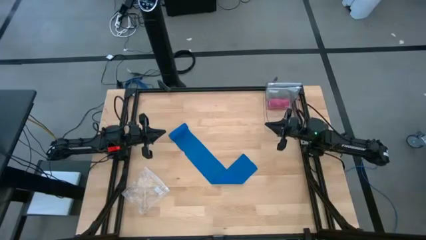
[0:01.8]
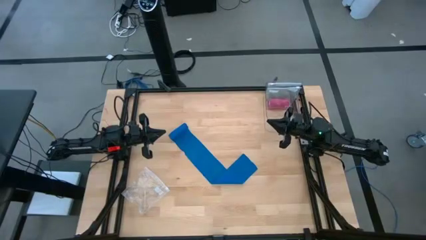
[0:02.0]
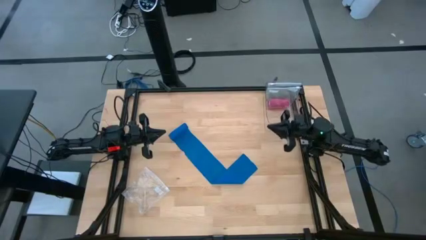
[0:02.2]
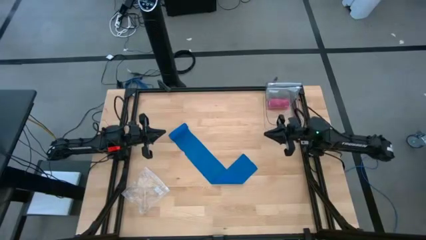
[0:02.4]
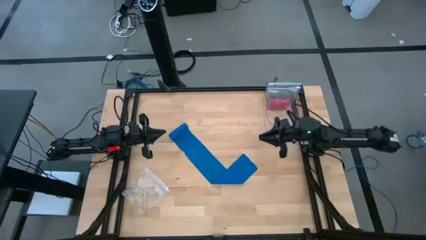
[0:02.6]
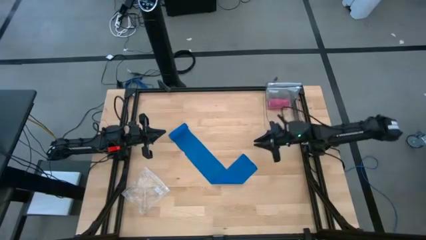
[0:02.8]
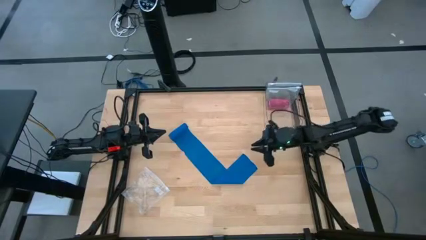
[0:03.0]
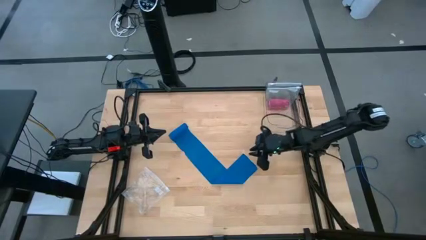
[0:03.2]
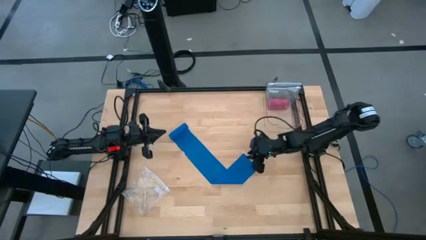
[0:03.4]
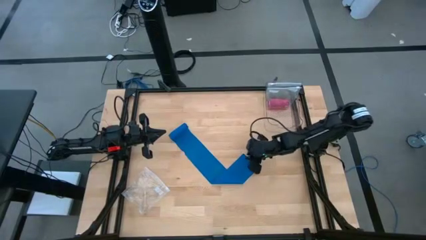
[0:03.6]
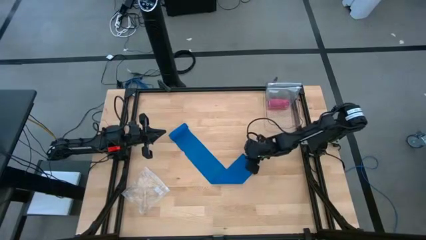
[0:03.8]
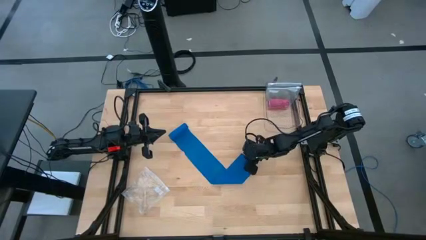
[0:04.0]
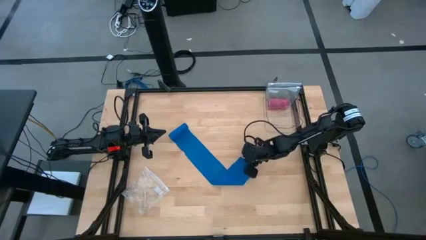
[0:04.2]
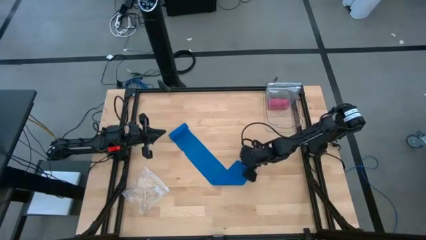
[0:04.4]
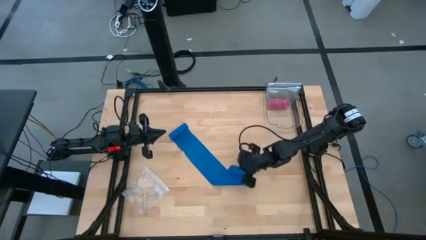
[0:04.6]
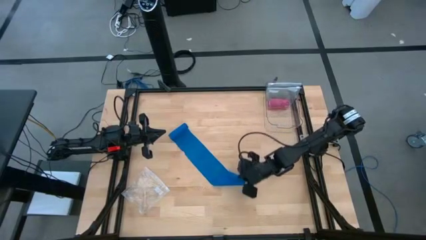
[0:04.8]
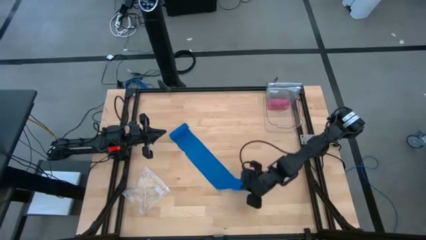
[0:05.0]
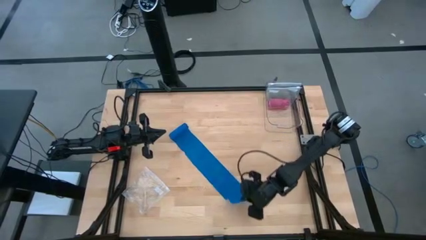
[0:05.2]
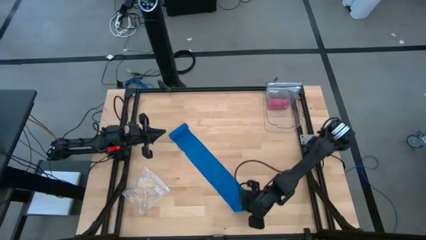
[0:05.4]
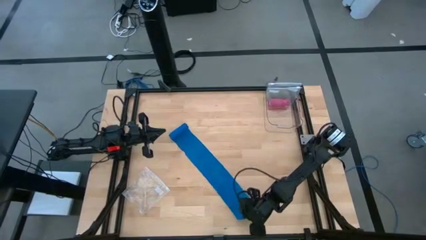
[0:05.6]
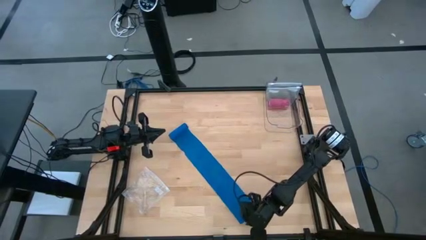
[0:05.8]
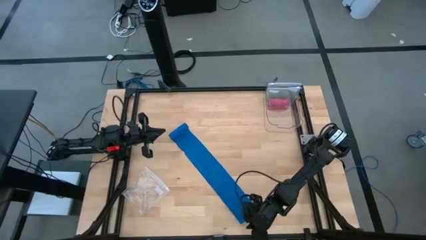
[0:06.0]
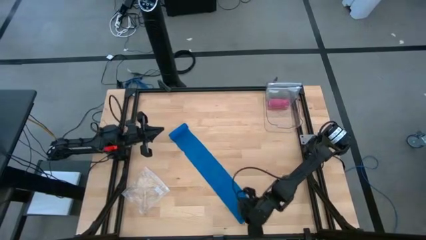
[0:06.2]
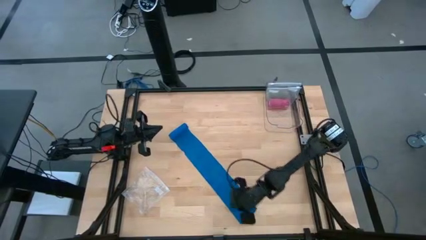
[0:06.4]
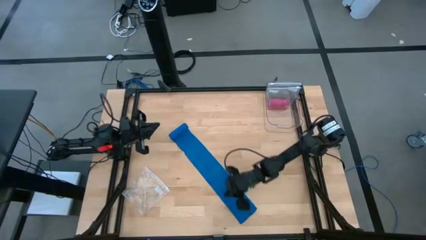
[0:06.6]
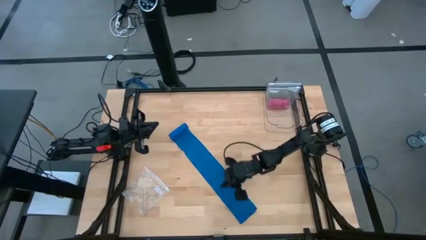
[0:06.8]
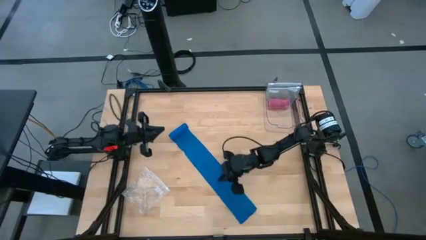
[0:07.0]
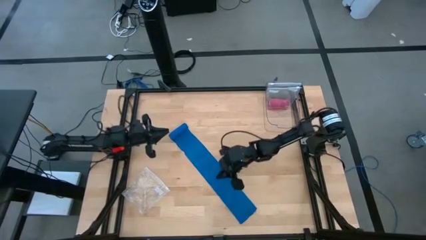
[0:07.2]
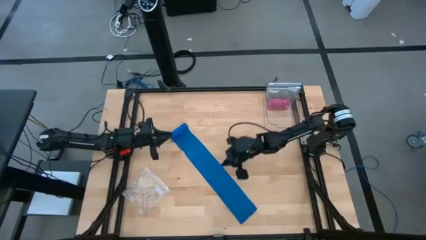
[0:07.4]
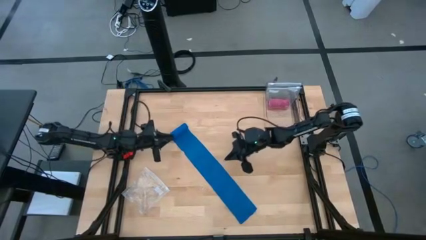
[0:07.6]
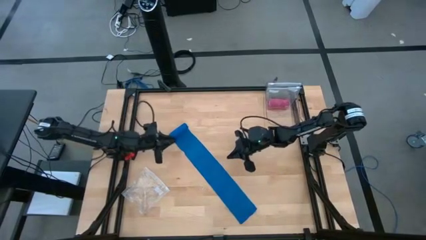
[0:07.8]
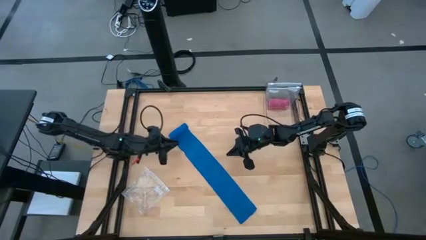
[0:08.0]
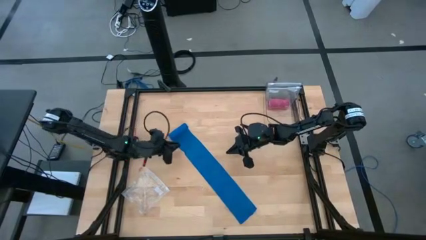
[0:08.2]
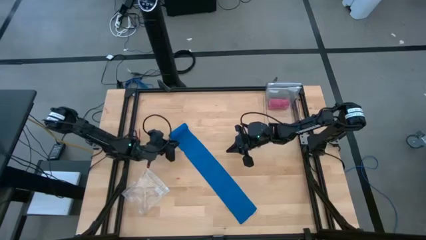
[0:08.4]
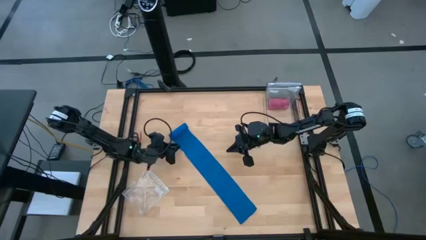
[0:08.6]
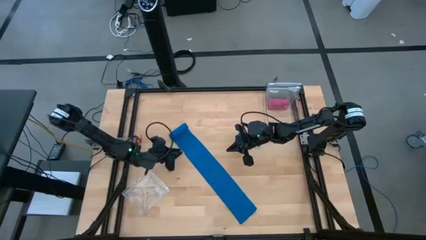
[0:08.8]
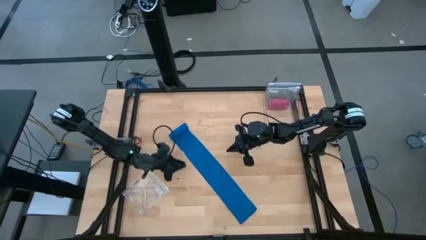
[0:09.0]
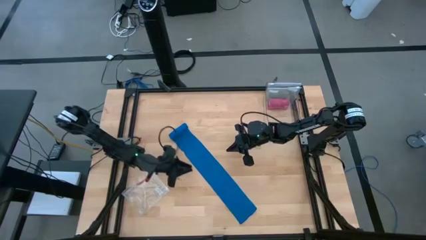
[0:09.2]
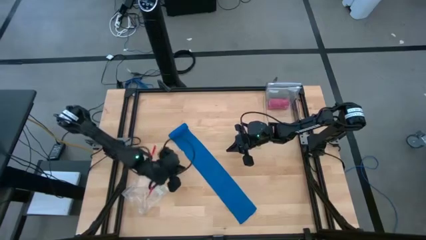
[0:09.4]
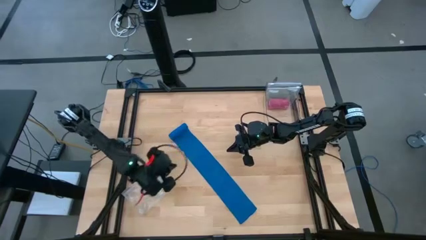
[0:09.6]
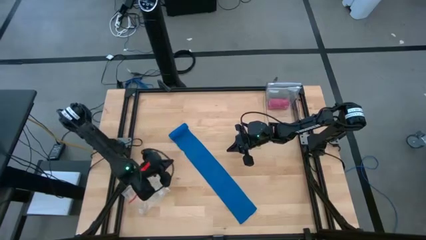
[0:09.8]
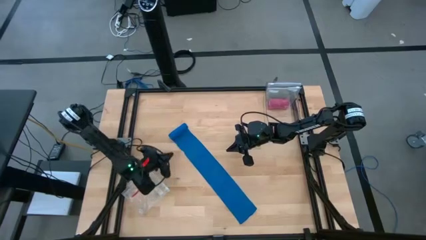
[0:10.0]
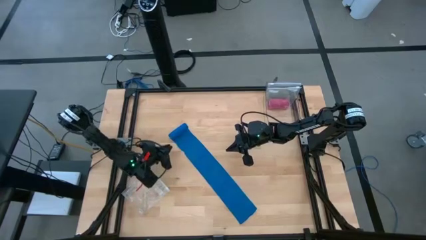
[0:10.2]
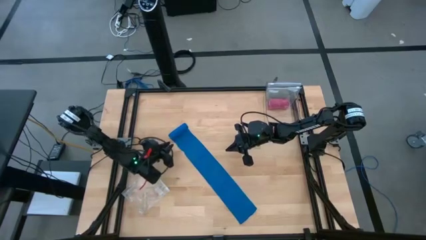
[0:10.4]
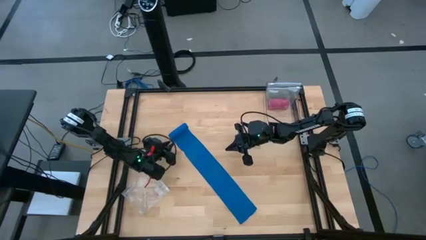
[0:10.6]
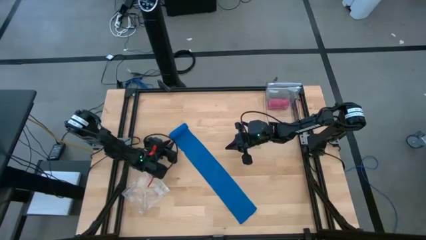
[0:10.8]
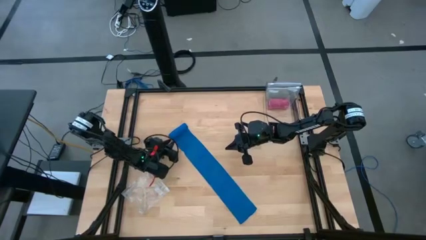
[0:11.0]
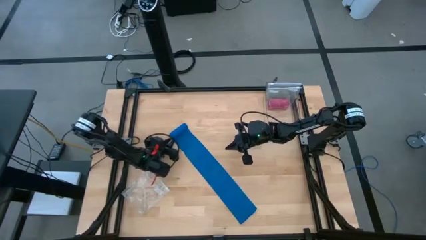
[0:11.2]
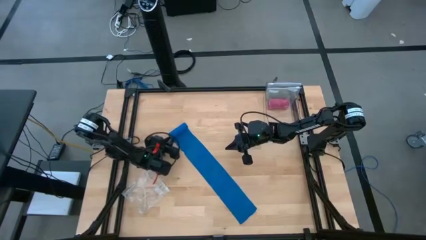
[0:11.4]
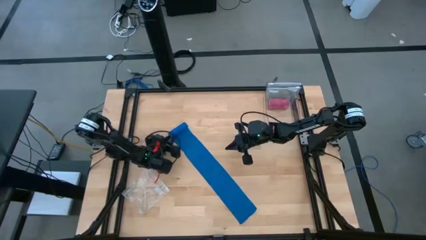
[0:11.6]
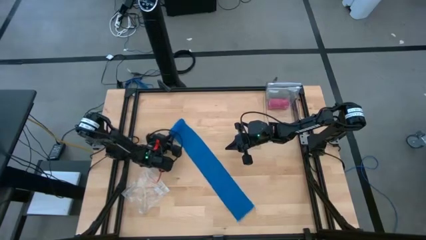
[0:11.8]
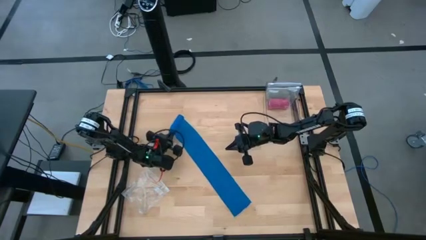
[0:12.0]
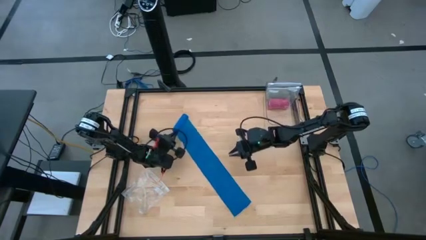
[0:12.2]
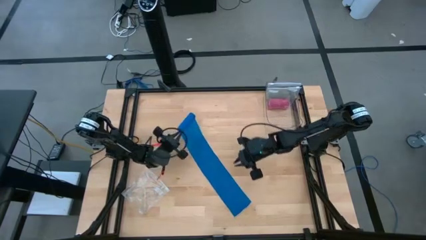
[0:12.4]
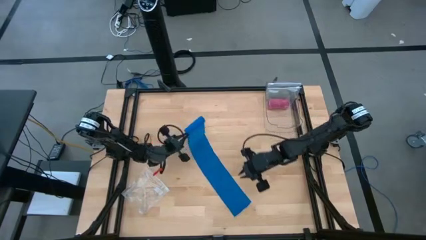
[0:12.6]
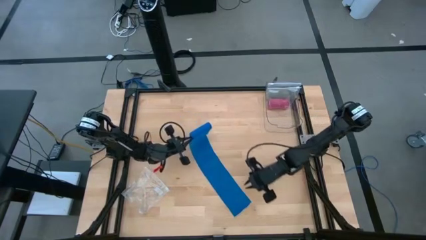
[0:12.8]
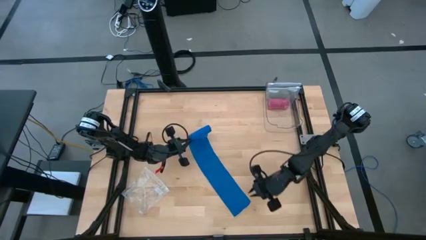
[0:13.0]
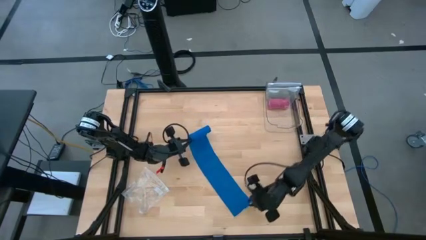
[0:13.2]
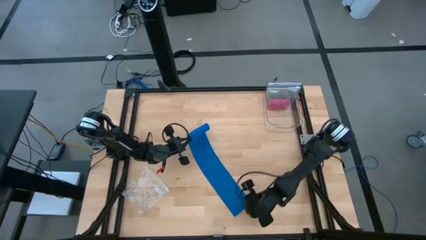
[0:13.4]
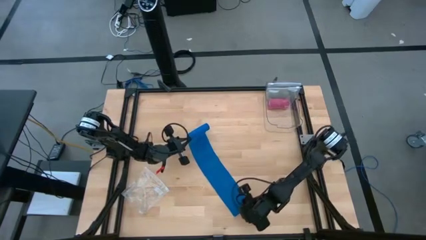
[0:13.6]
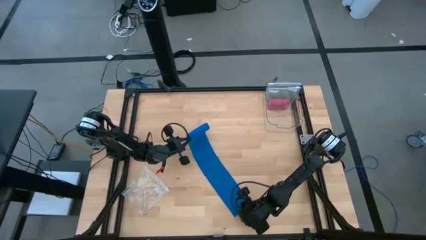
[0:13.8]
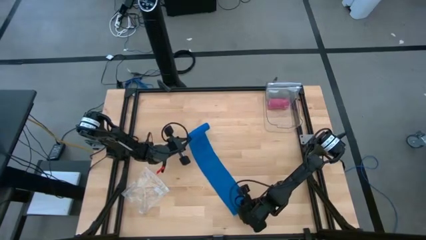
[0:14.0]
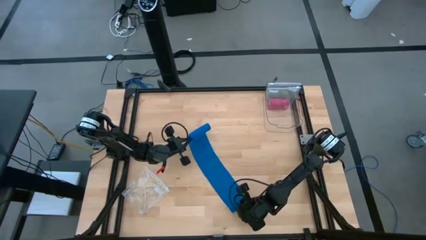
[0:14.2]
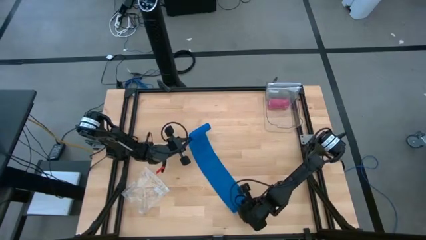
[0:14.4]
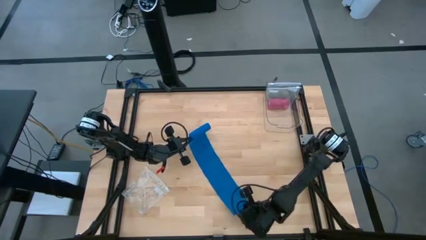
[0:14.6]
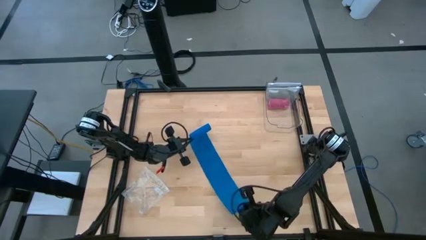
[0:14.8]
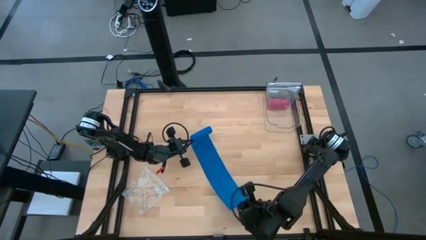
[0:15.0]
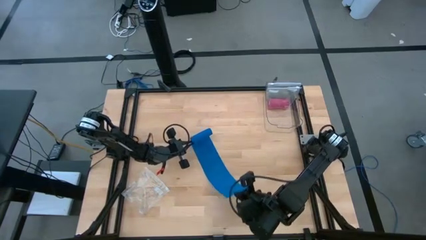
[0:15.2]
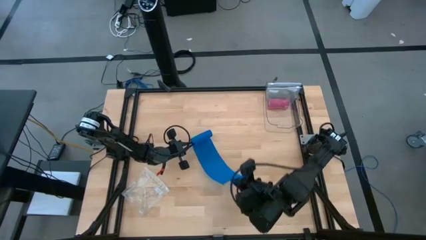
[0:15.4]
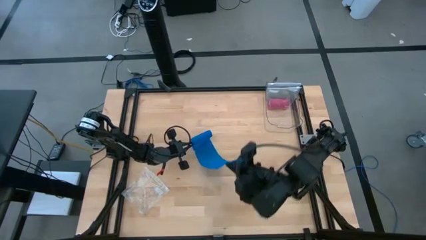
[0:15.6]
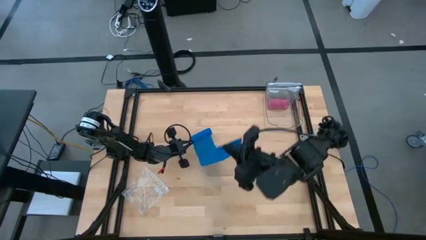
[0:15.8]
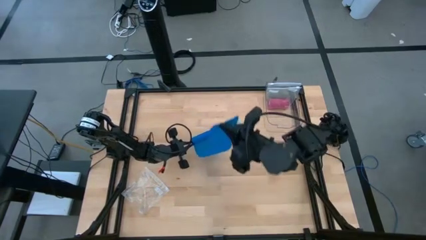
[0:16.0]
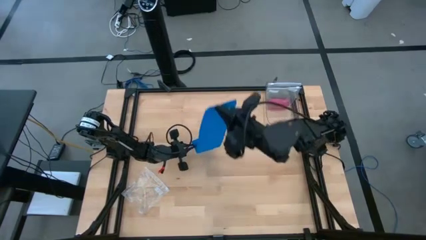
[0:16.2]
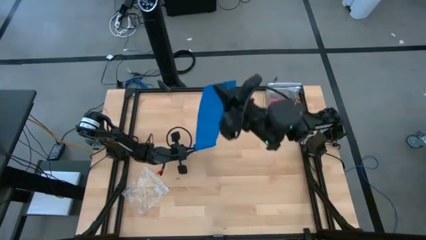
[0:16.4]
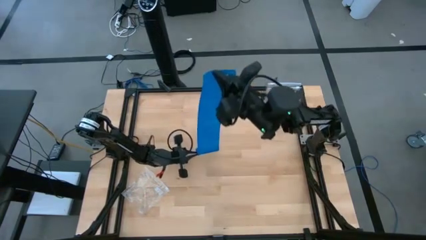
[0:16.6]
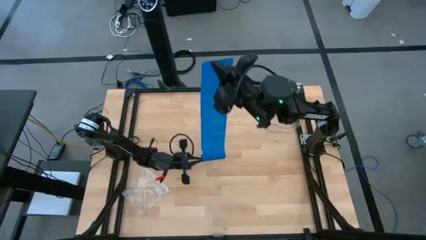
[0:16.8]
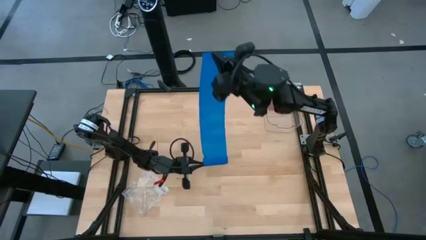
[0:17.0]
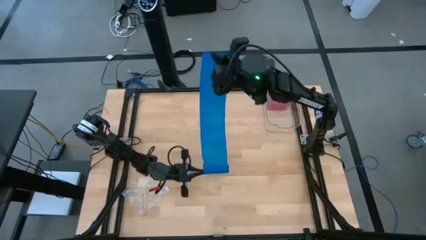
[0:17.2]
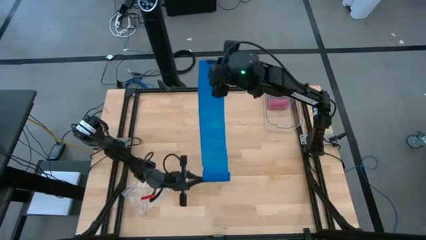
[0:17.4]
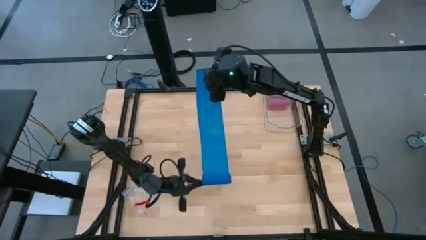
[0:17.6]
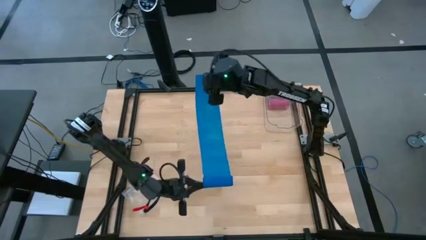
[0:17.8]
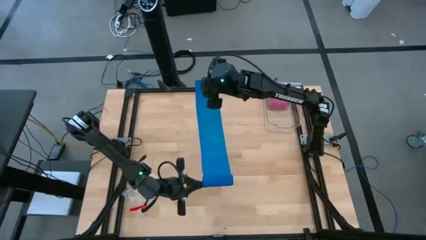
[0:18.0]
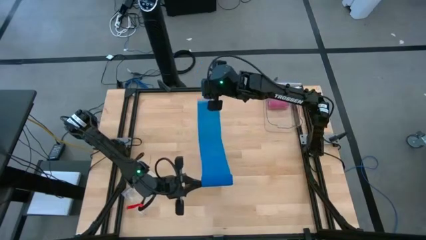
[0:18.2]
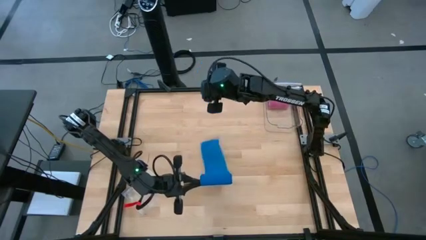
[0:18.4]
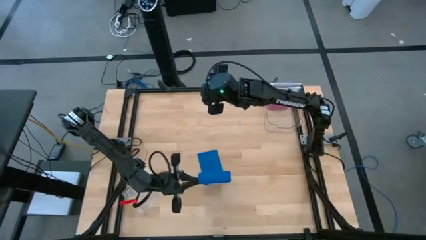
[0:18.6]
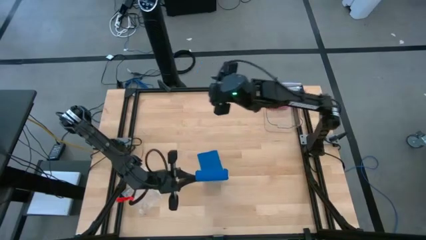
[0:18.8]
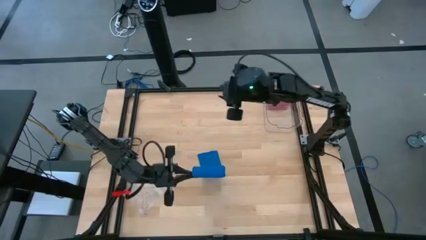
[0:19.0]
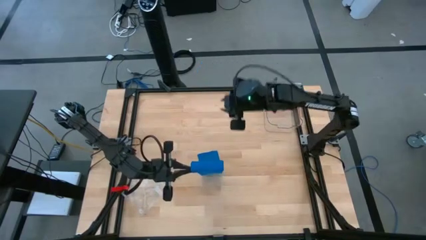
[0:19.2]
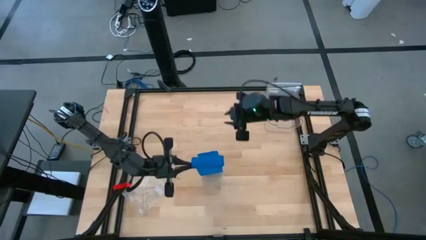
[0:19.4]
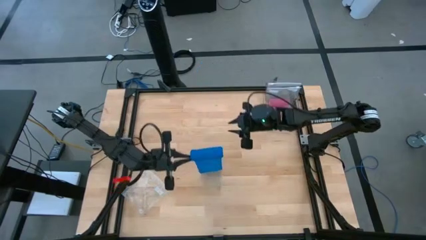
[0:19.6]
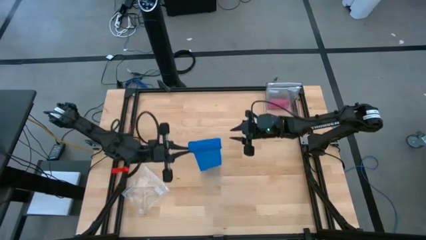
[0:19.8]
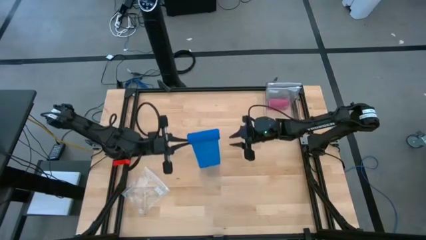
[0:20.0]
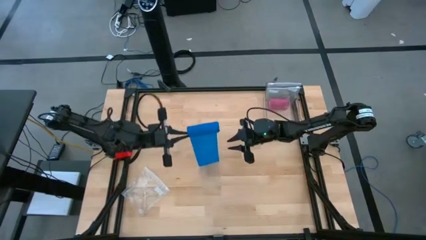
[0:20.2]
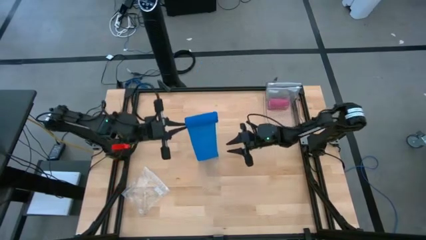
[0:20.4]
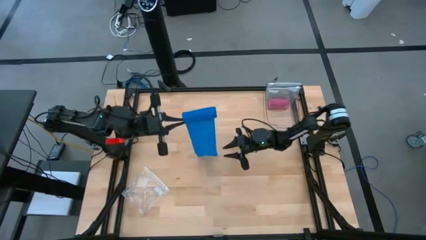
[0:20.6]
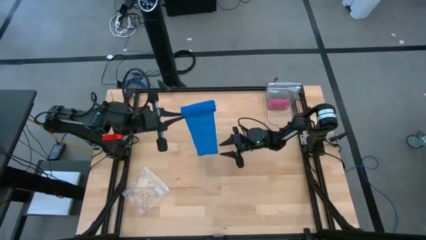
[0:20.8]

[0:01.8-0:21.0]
Task: Roll bandage
Roll the blue bandage
